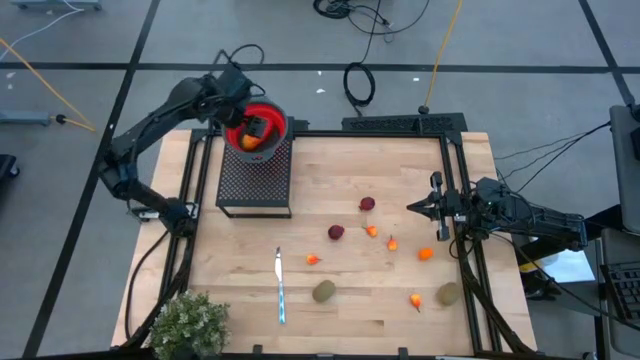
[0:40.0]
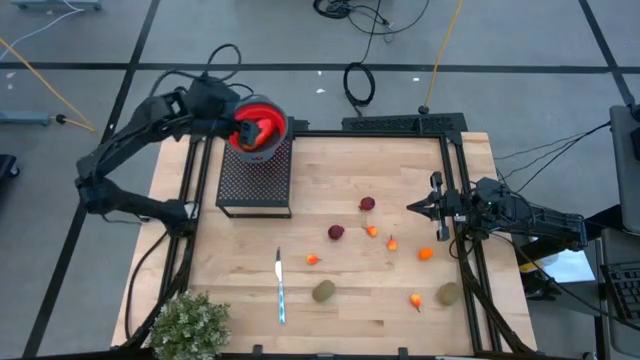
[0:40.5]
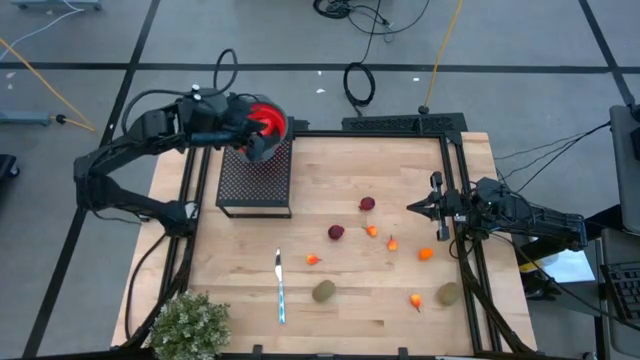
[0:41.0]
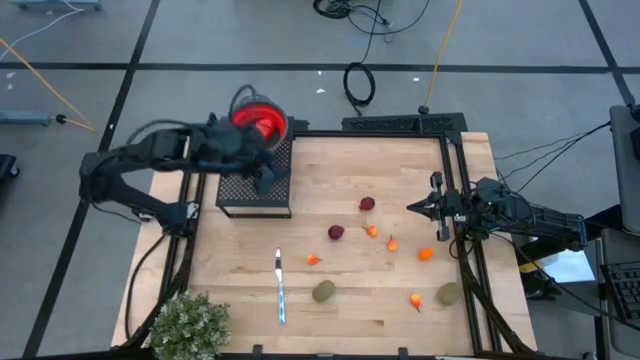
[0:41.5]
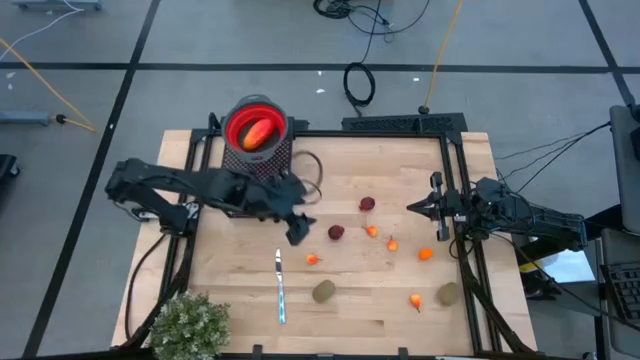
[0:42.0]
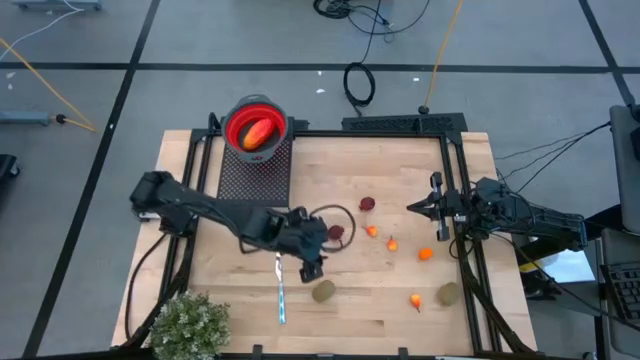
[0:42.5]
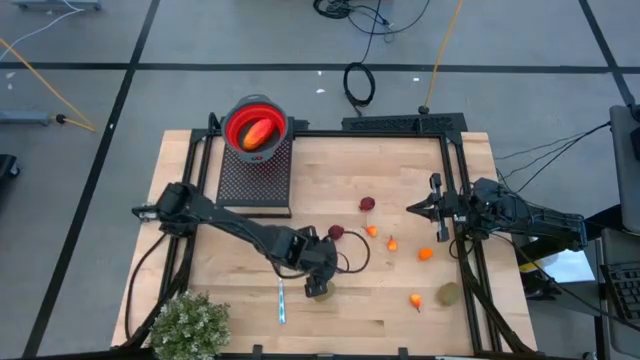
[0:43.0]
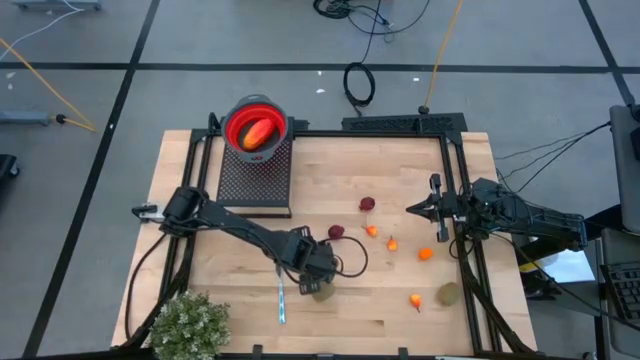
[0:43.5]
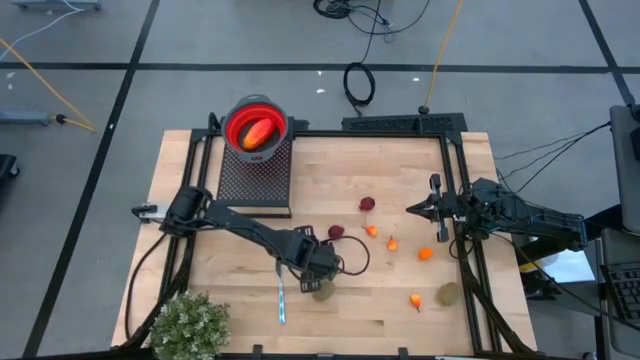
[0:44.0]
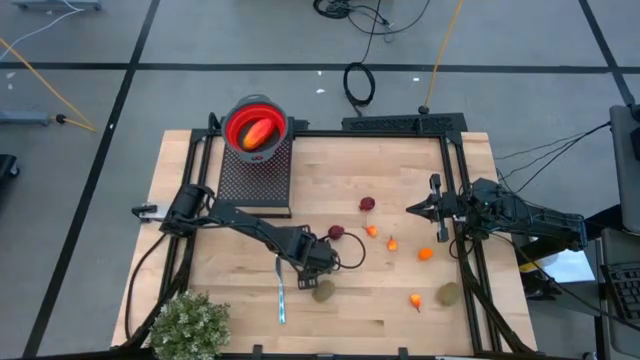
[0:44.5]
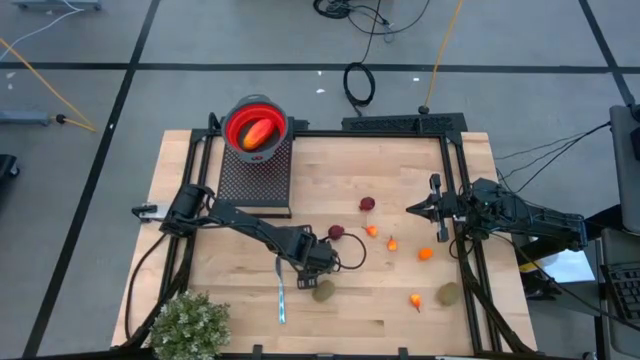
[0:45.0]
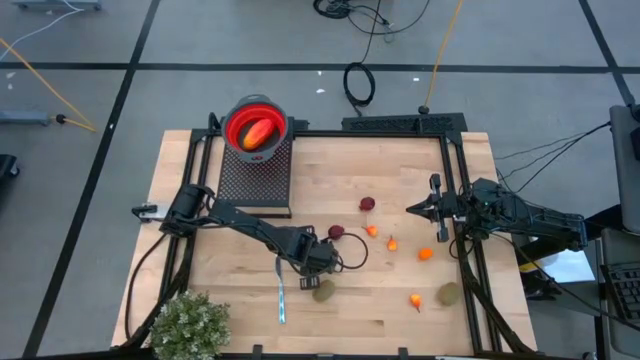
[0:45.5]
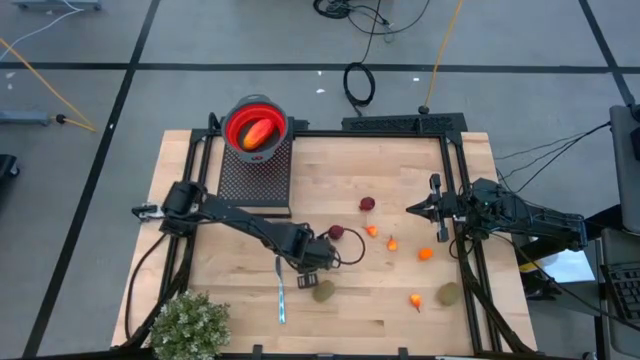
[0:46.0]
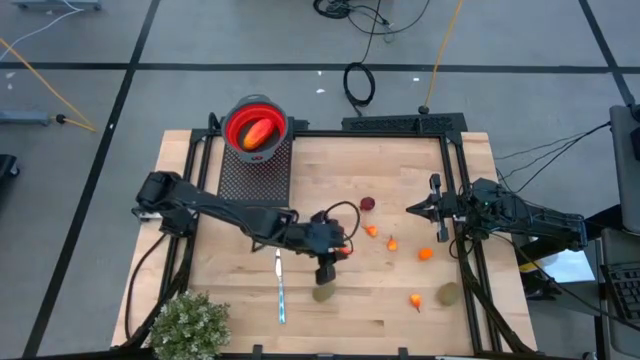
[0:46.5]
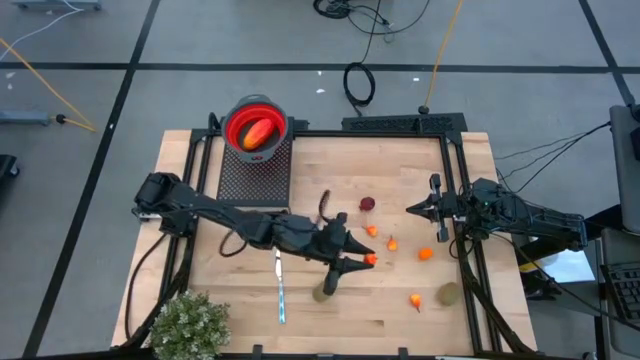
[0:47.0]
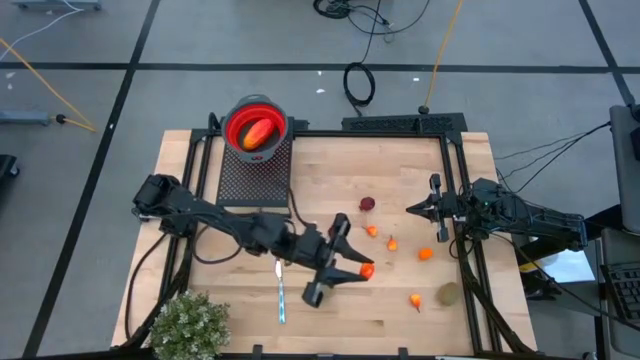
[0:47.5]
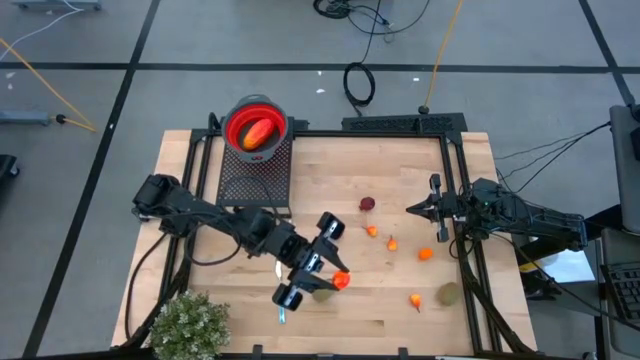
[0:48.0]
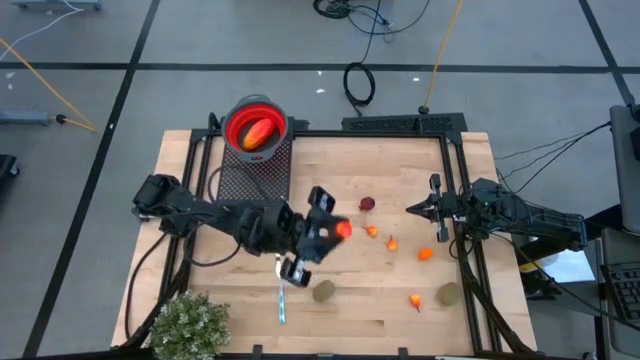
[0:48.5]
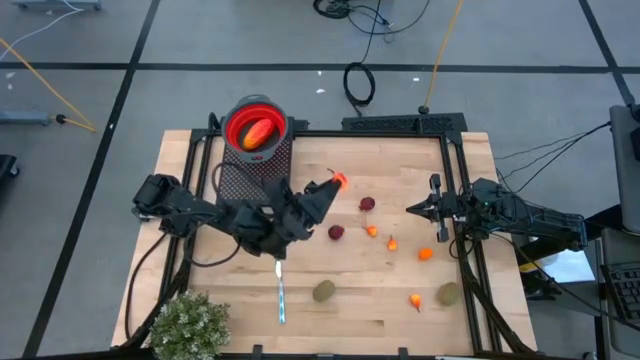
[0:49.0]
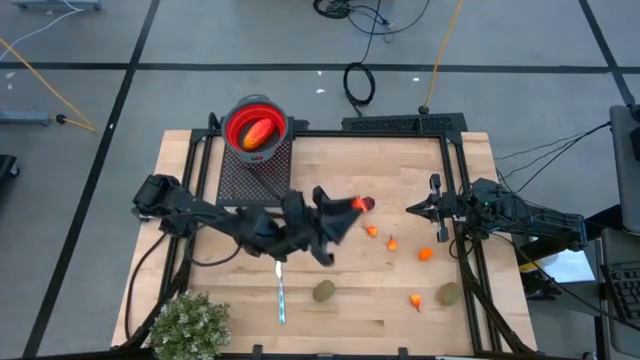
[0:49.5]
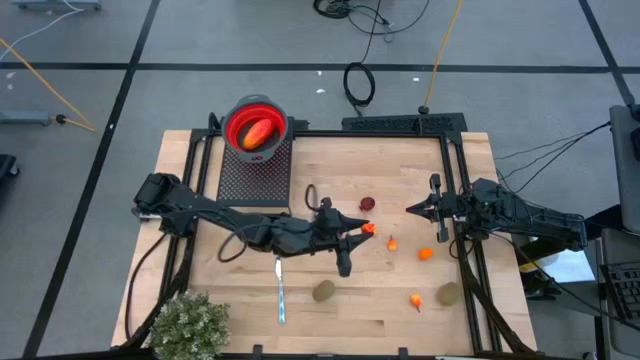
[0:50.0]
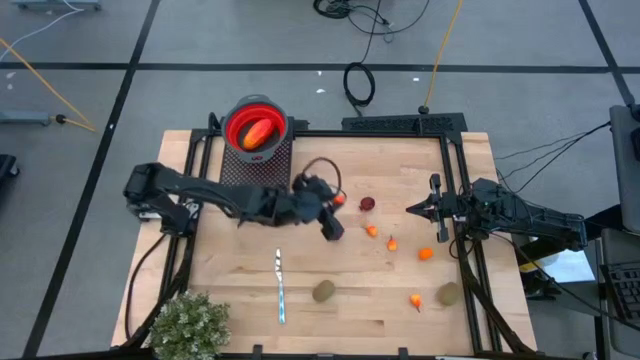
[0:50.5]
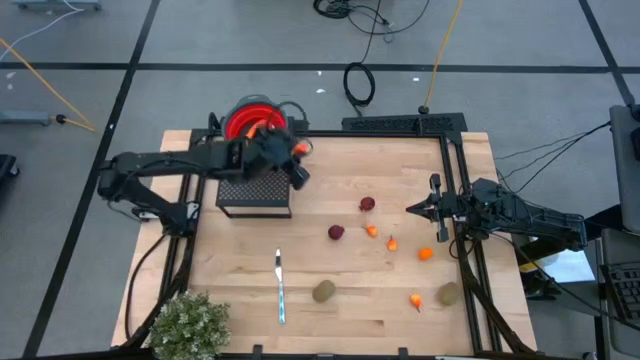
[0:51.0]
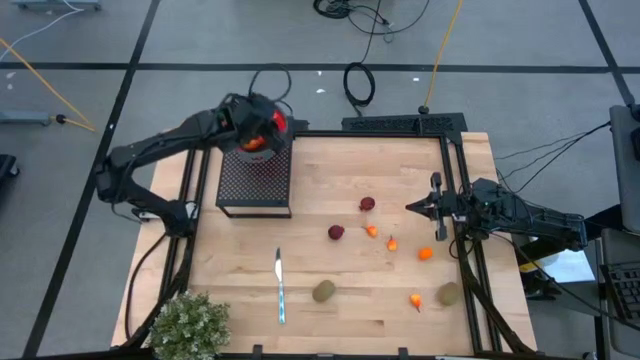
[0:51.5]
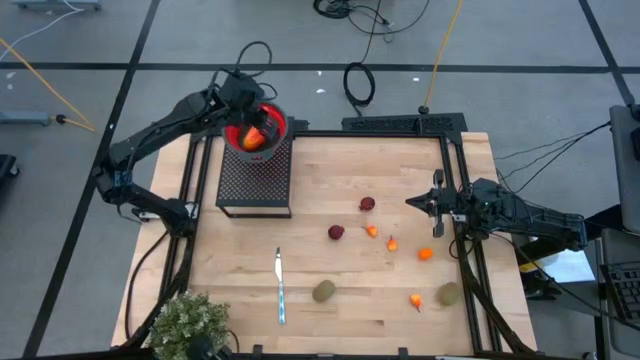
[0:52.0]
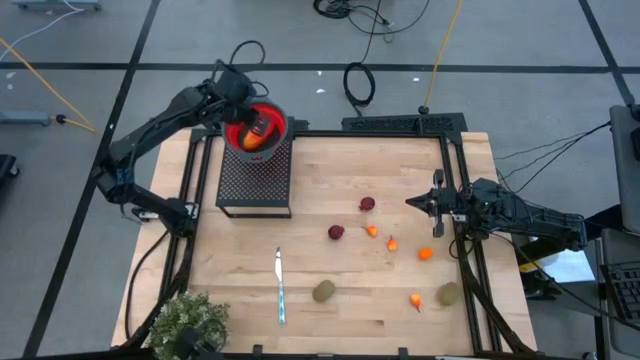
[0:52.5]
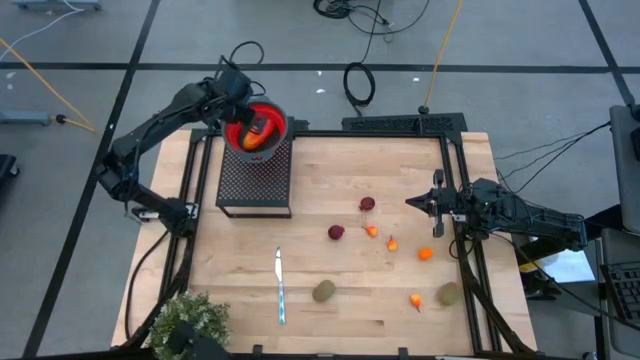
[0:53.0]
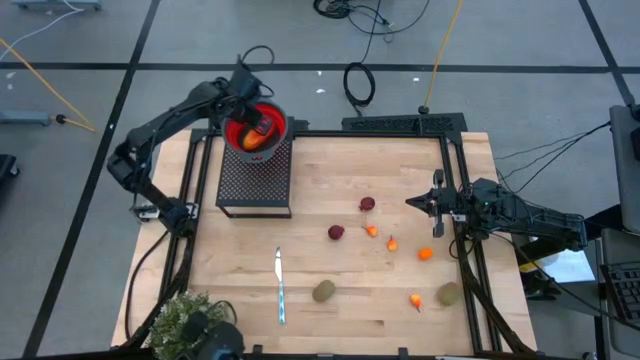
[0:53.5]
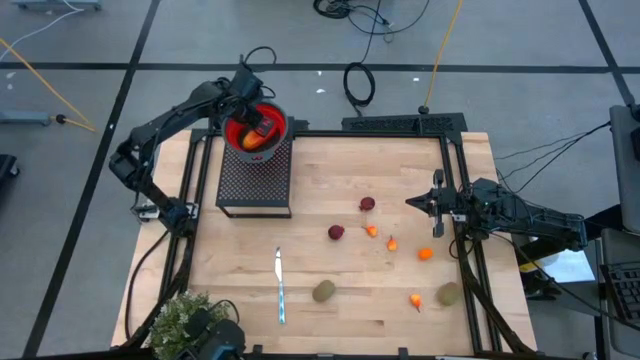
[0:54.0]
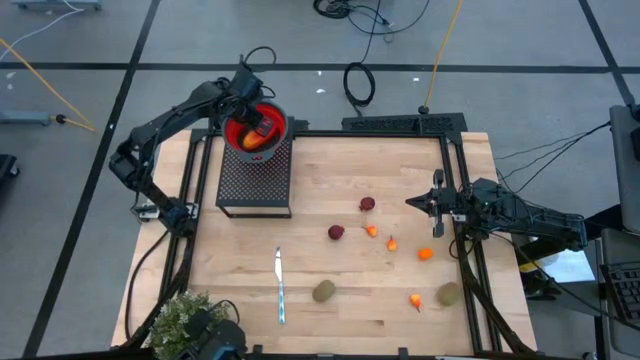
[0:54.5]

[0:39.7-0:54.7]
Task: Pick & Place Fruit
Put the peach into the red strainer bowl on the shelf

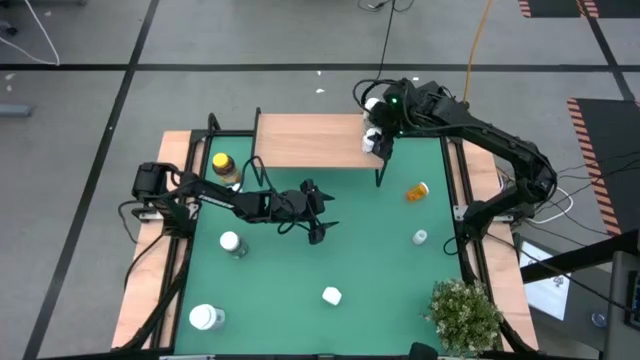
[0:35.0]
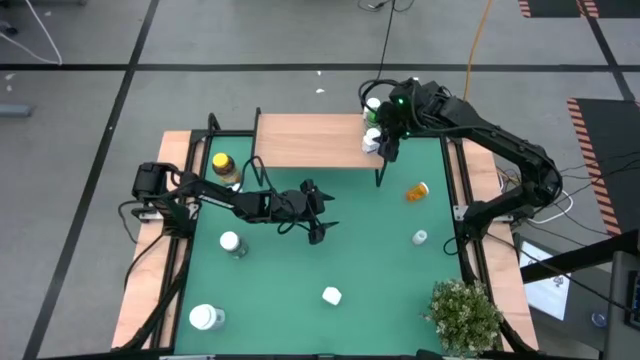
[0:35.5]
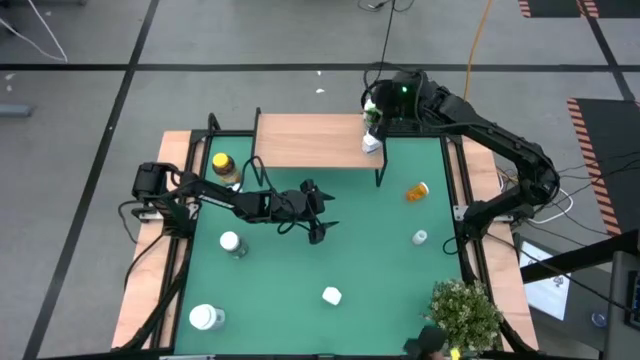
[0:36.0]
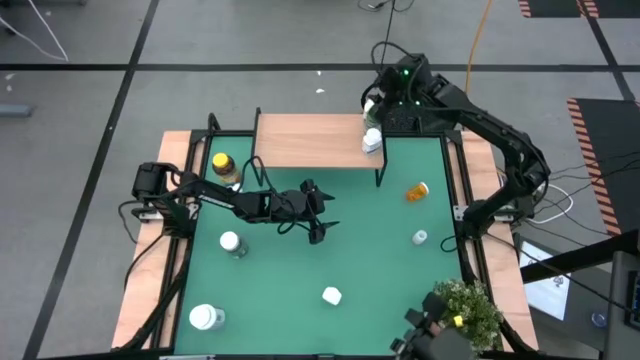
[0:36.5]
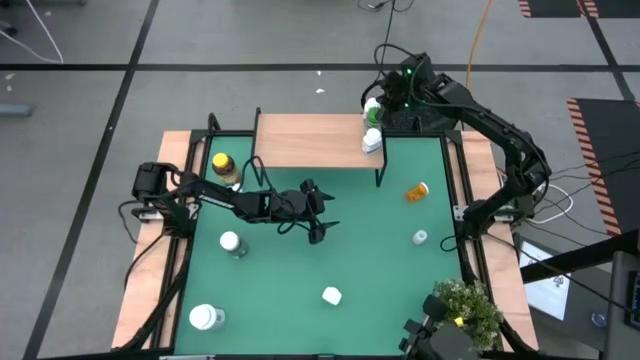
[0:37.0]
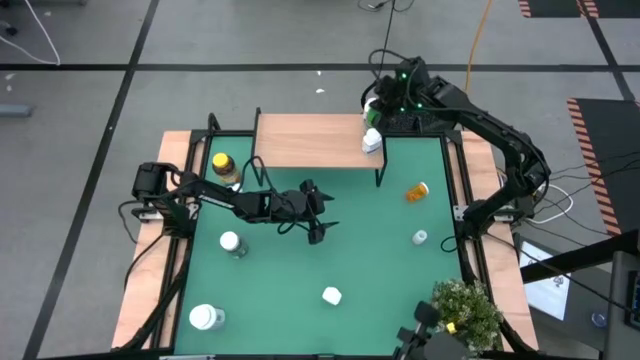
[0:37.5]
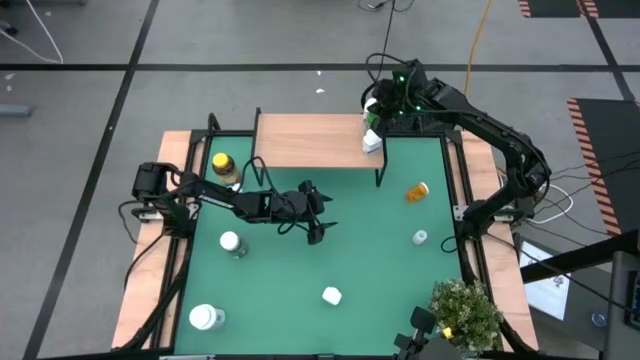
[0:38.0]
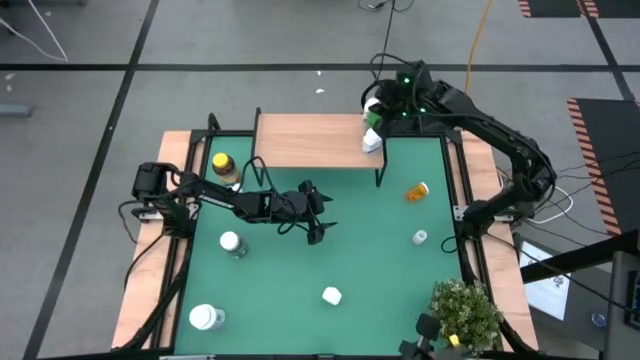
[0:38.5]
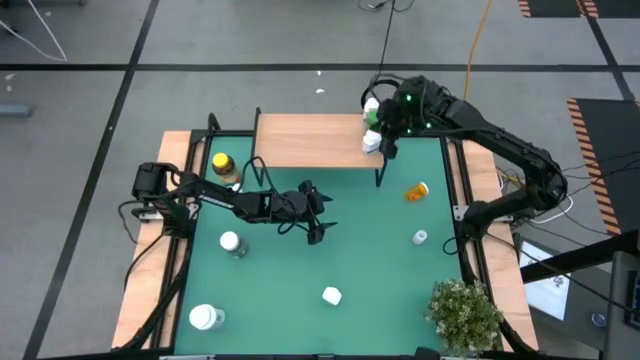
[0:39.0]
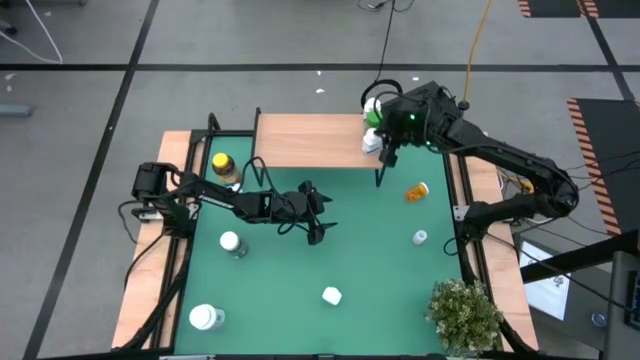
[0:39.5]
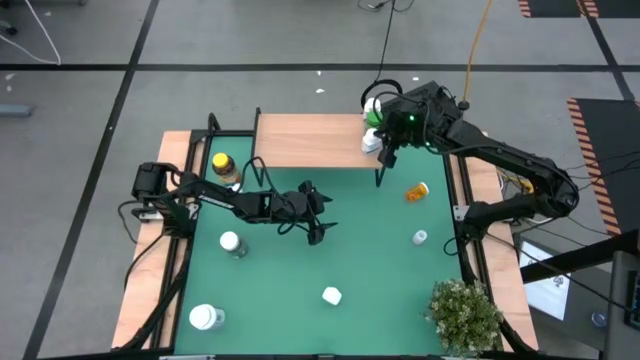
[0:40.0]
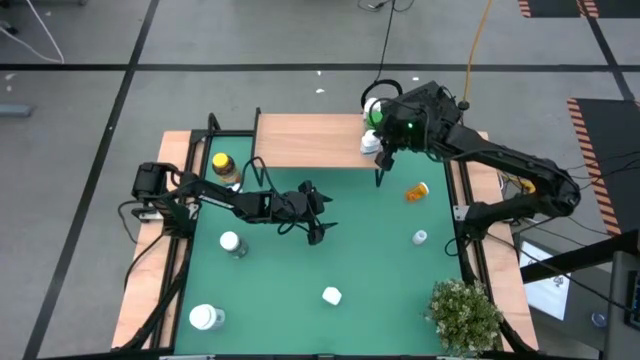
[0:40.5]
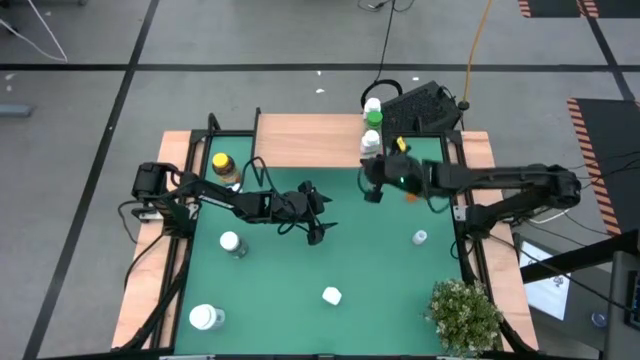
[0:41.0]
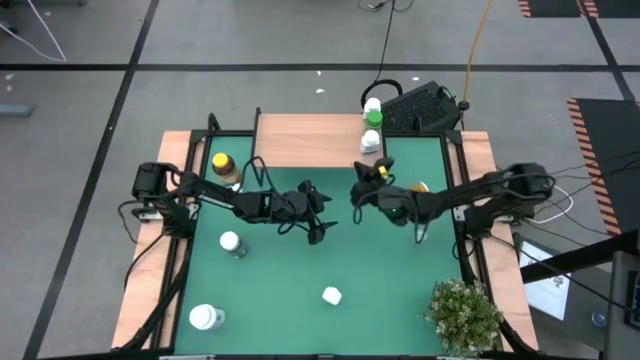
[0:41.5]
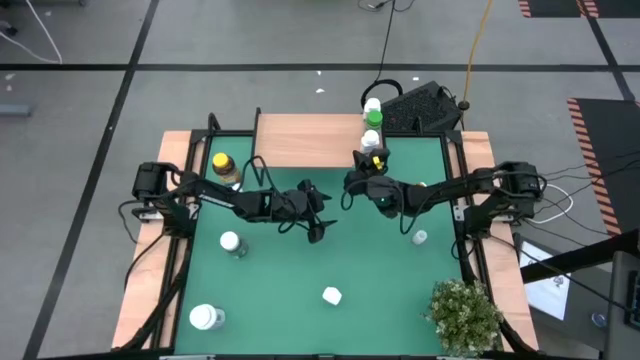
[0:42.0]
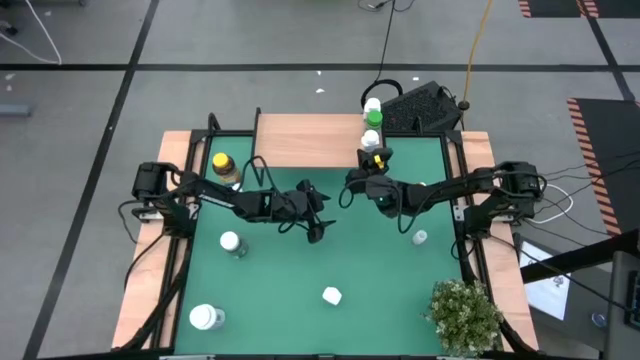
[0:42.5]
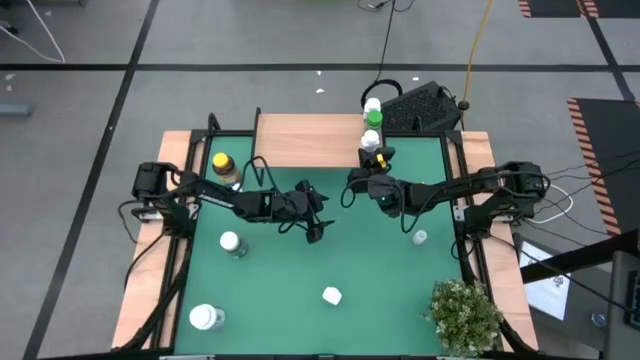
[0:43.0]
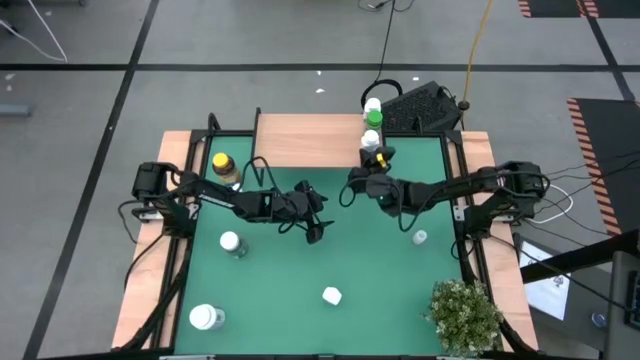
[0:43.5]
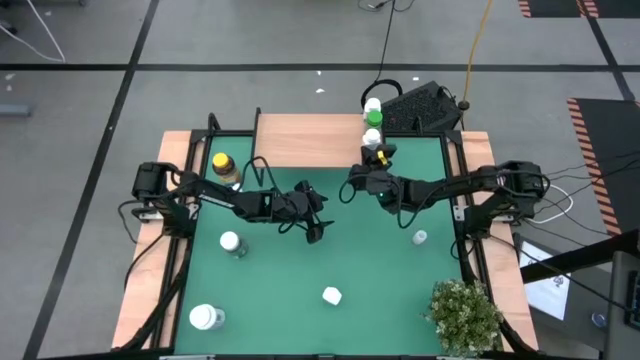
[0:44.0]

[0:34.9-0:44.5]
Task: Pick and place medicine bottles onto shelf by color
Adjust the medicine bottles on the shelf
